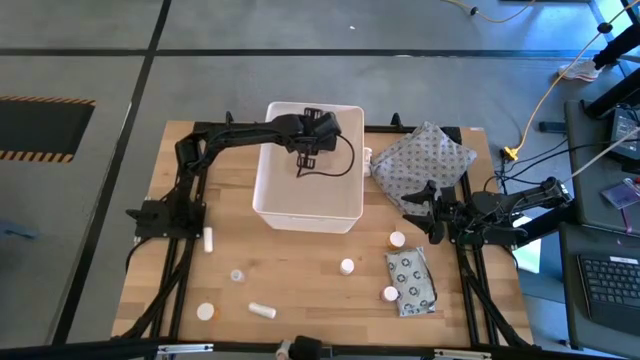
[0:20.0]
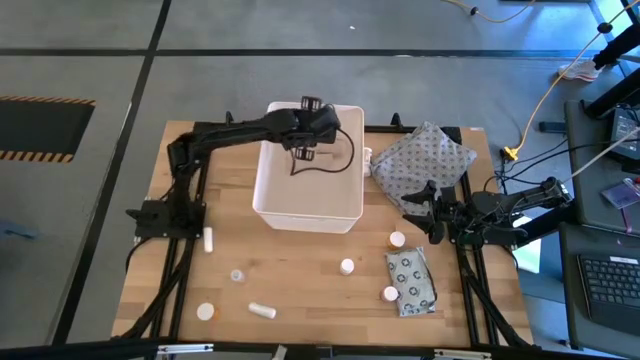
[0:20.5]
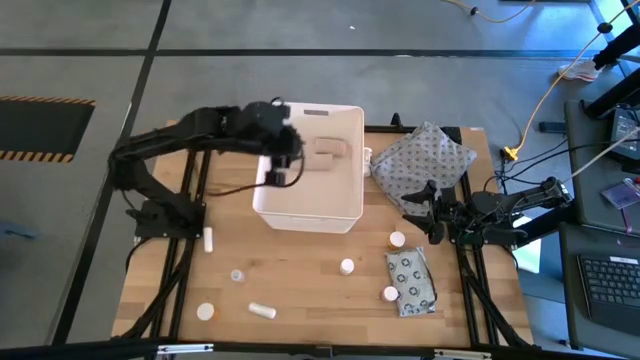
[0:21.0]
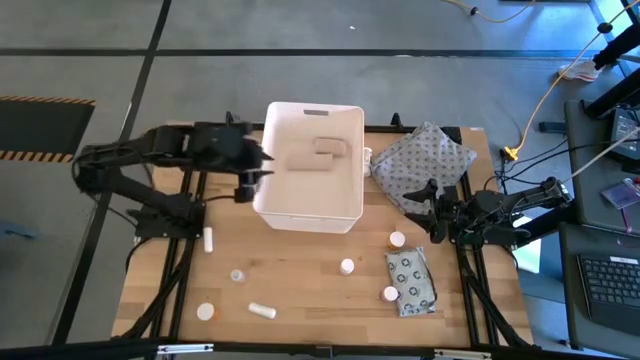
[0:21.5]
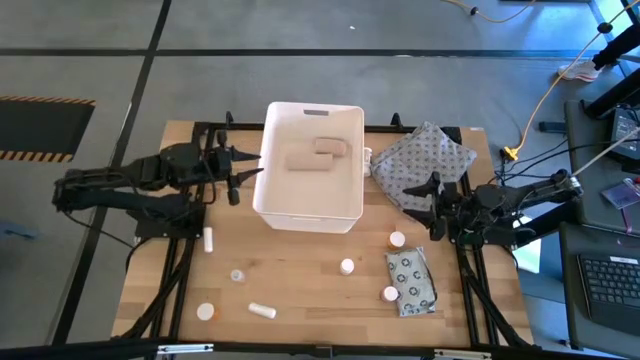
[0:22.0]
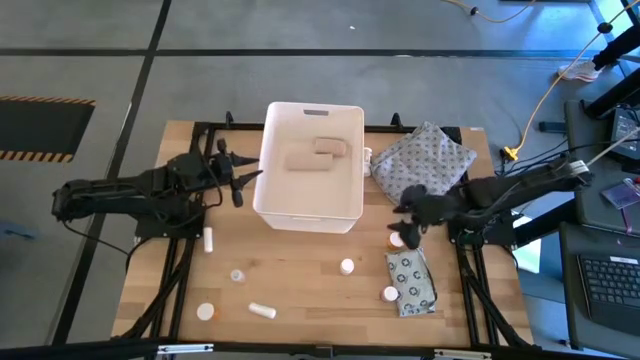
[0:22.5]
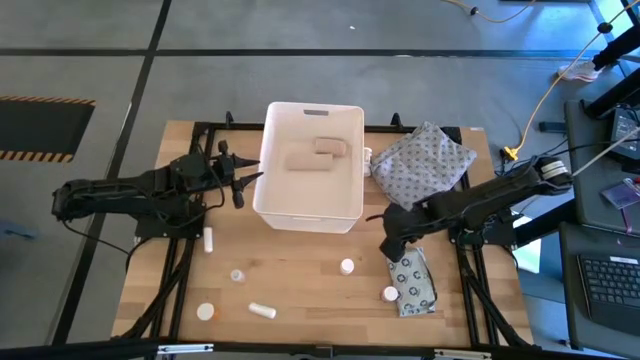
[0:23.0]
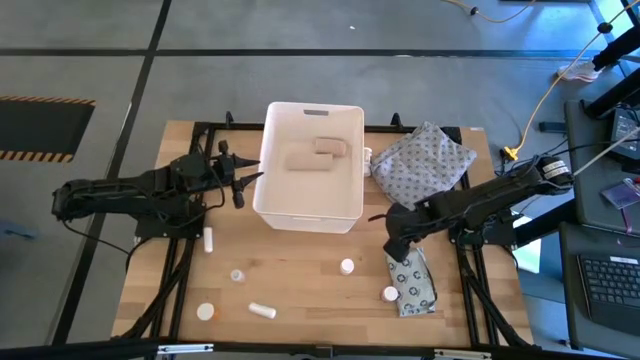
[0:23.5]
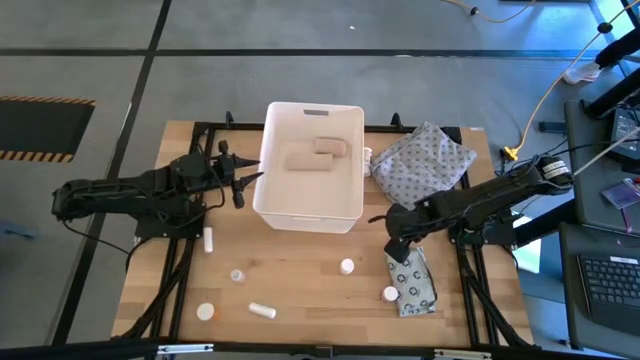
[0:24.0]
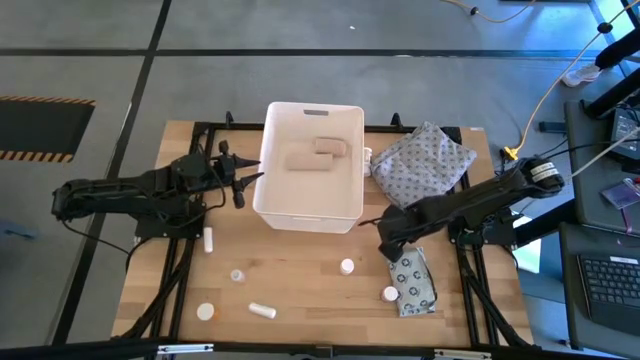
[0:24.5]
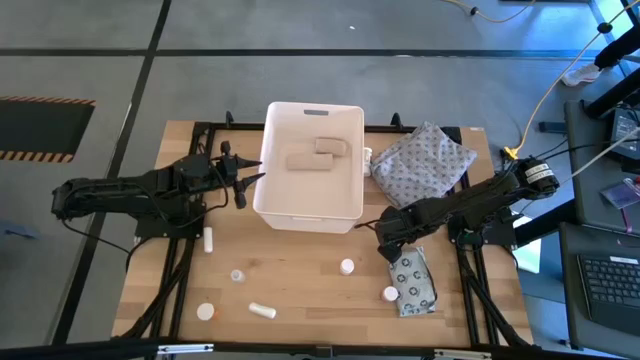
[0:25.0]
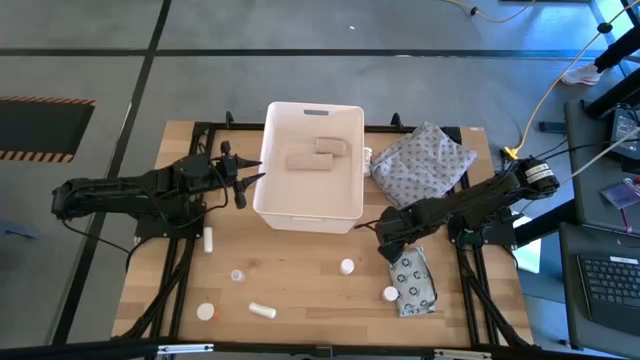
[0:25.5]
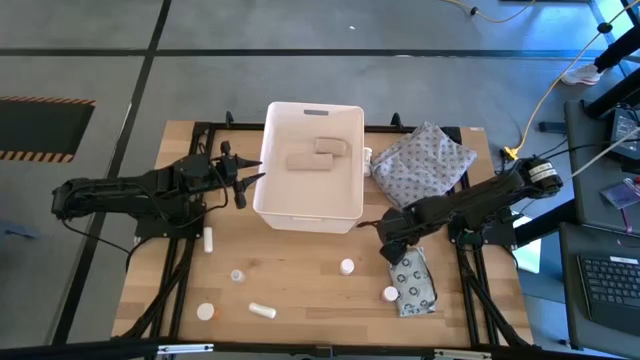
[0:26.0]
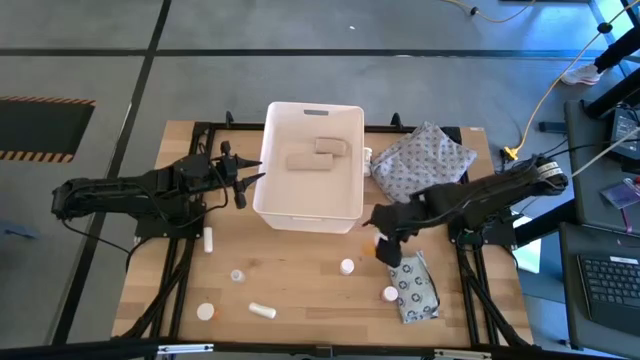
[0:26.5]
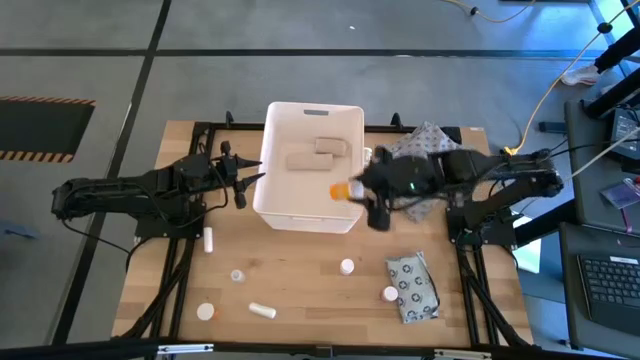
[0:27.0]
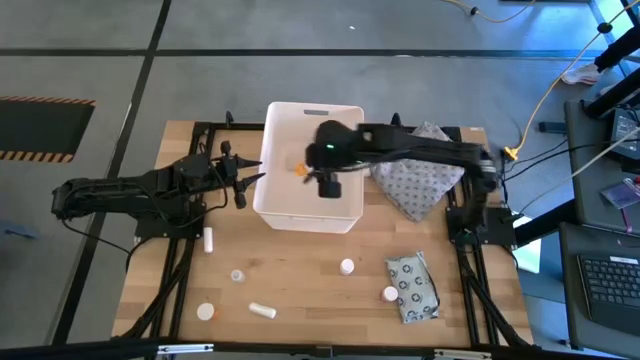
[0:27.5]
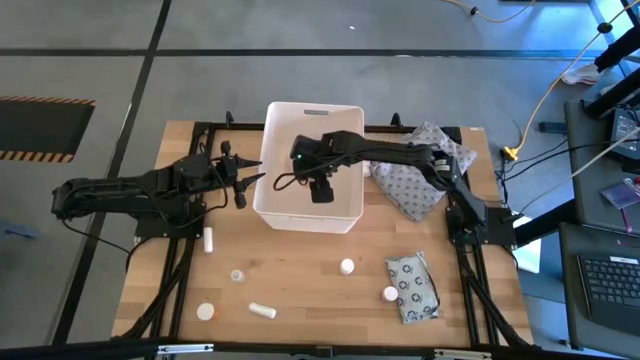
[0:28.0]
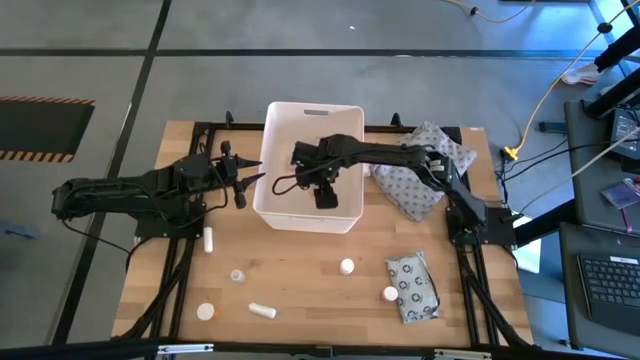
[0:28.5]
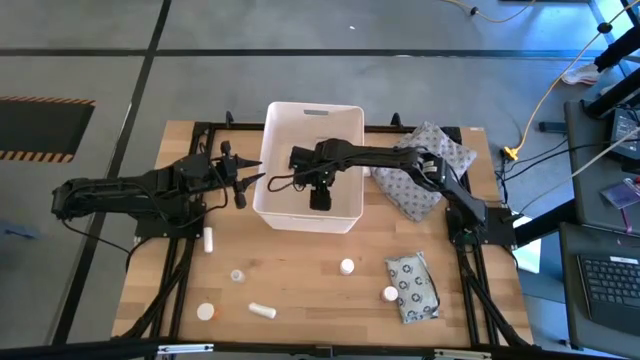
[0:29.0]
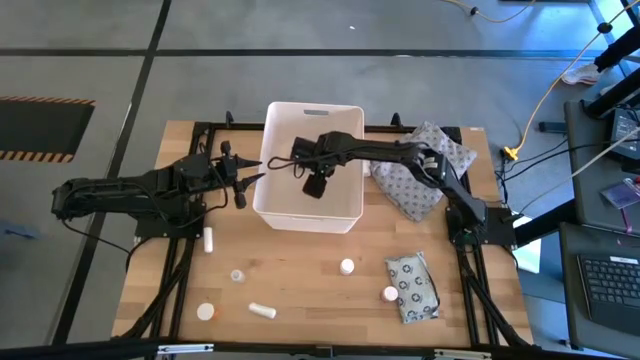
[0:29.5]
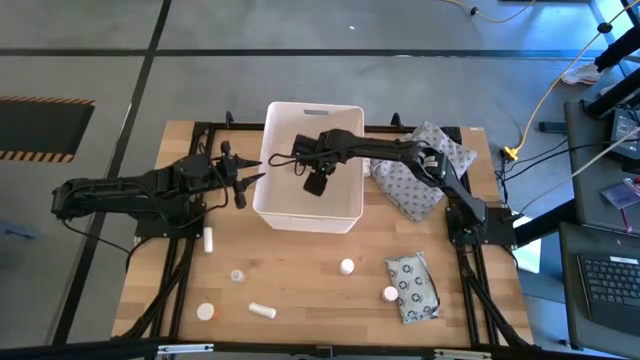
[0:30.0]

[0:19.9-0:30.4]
Task: Pick & place medical supplies in basket/bin
Put the top orange pill bottle into the white bin

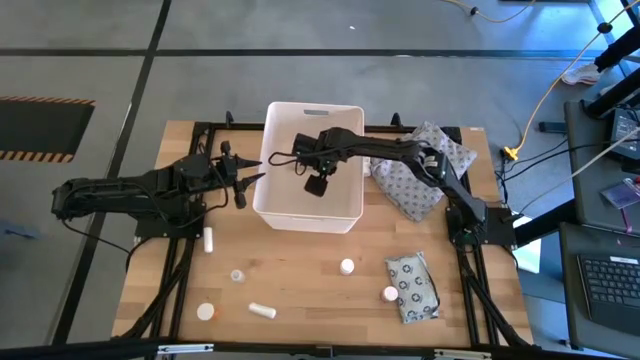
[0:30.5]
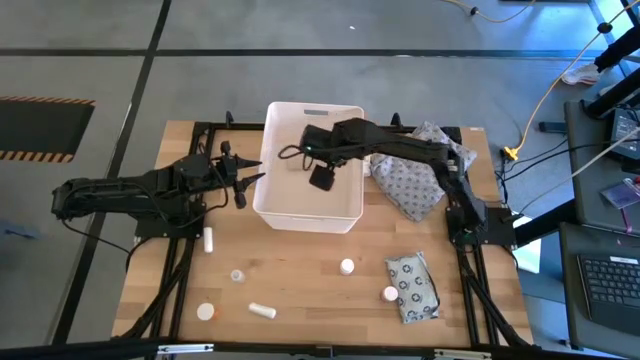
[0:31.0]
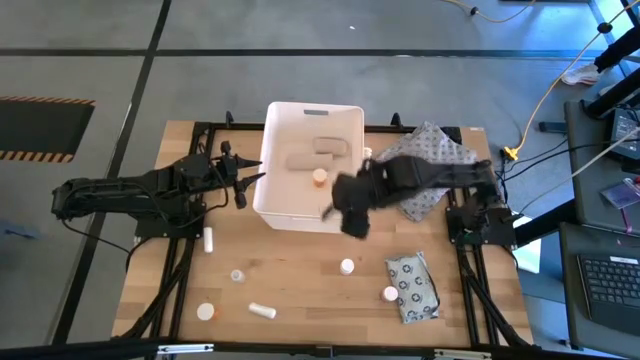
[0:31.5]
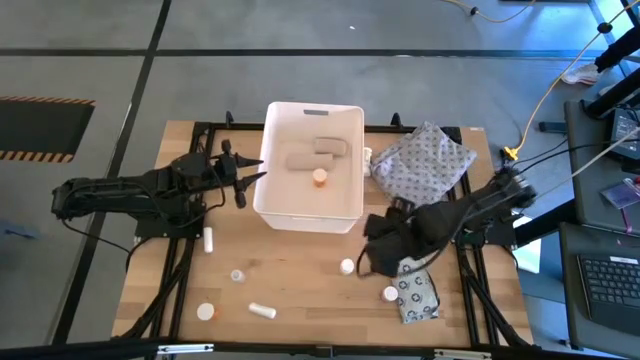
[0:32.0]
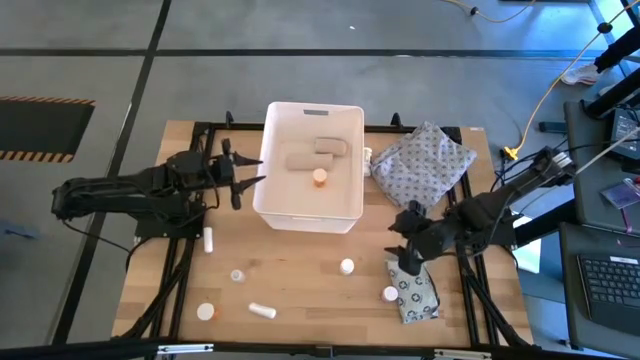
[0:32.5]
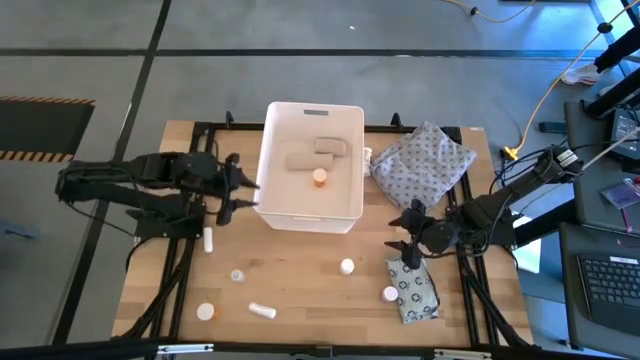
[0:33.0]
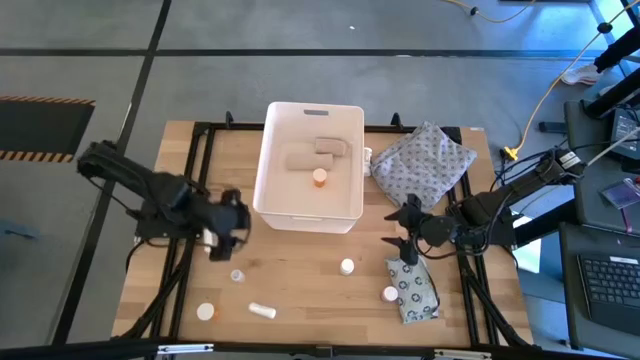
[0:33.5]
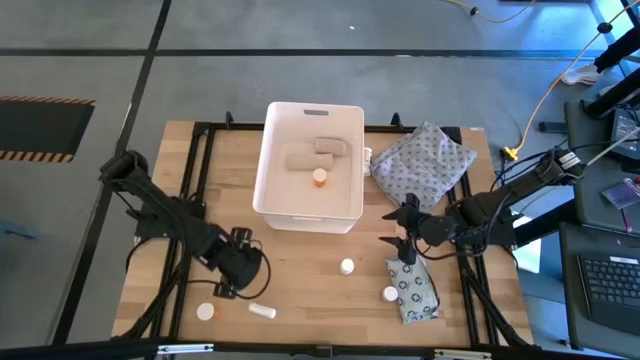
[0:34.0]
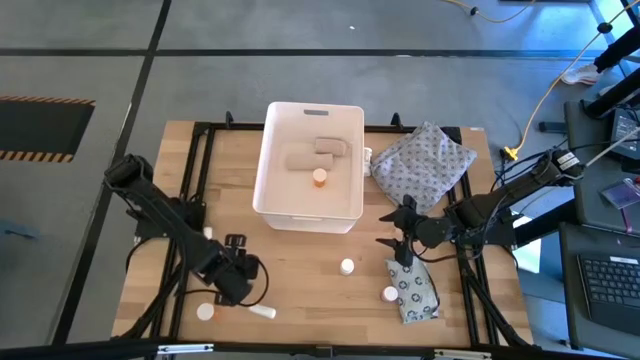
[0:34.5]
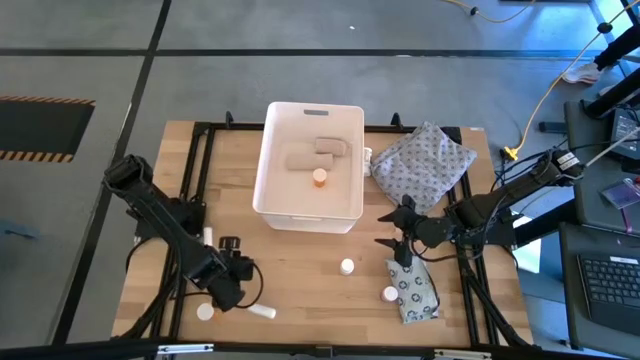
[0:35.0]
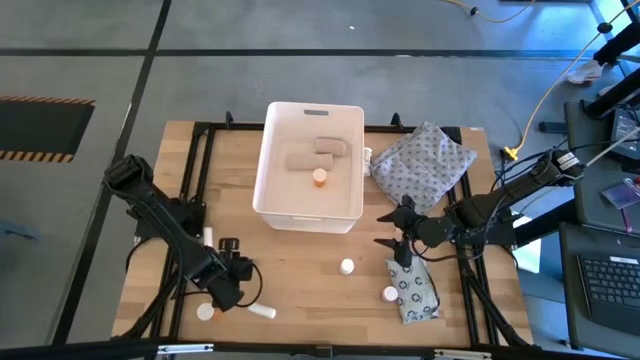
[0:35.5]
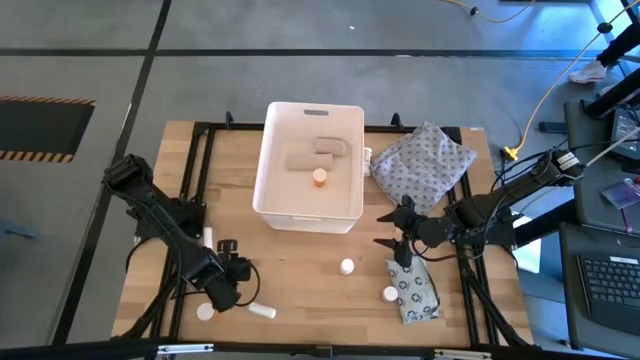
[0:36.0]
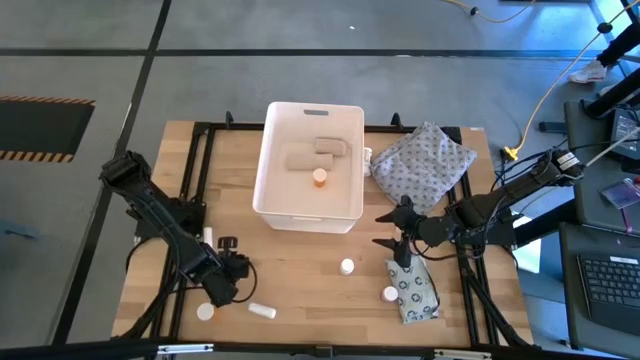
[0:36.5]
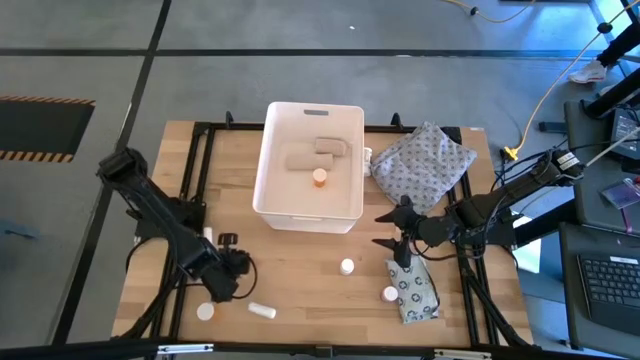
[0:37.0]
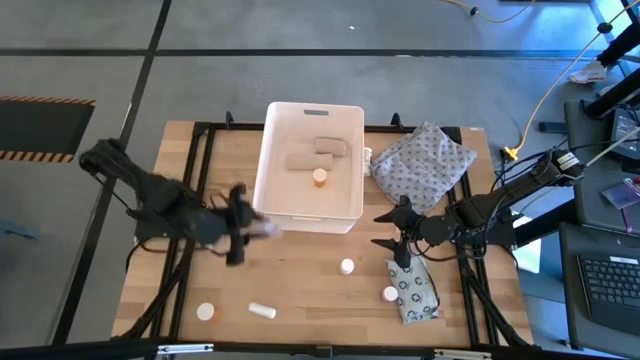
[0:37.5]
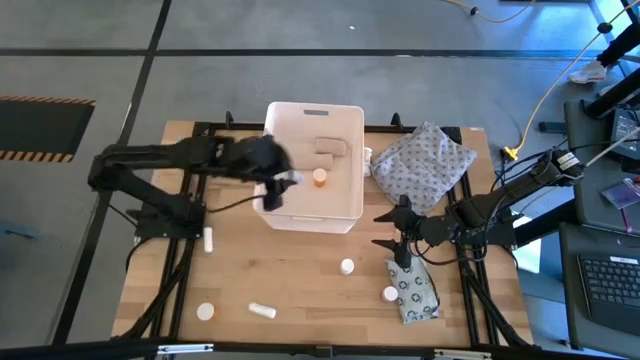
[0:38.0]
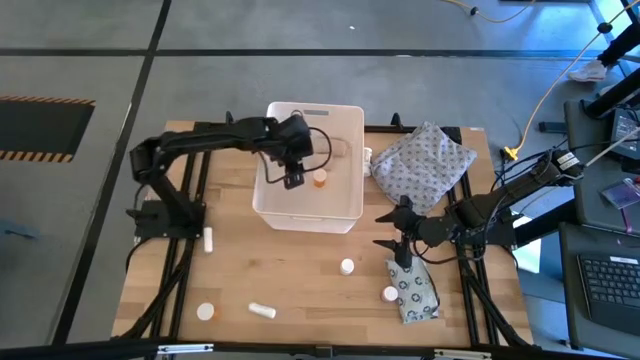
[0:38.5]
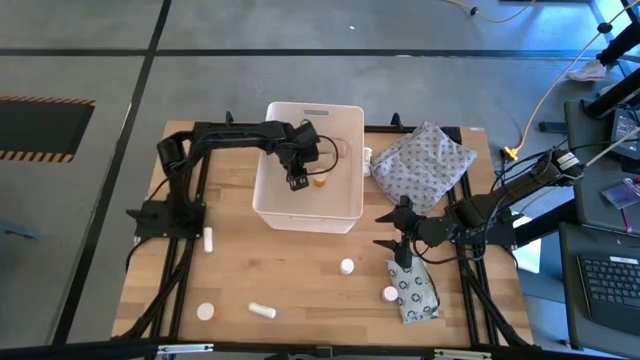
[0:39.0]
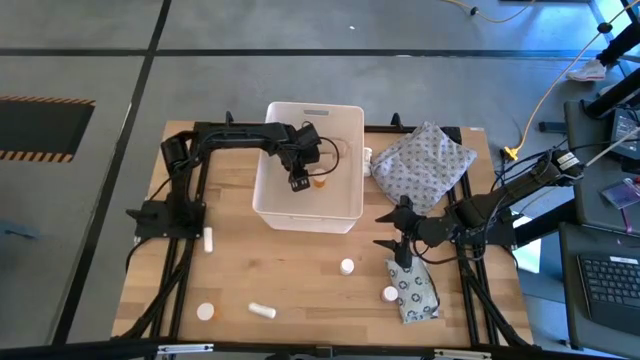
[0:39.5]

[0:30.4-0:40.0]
Put the transparent pill bottle into the white bin

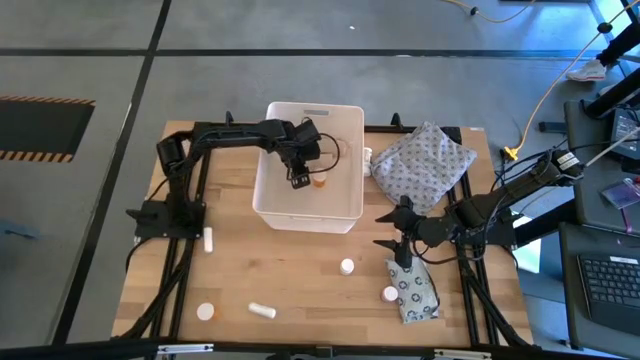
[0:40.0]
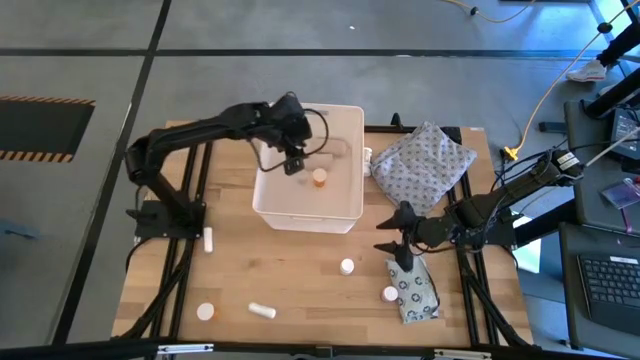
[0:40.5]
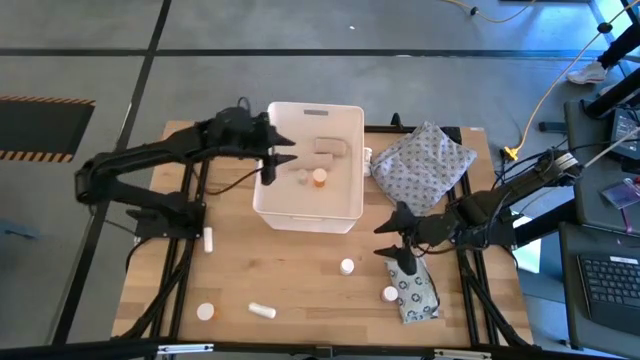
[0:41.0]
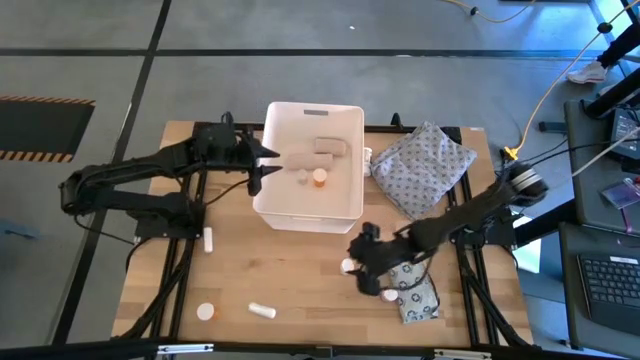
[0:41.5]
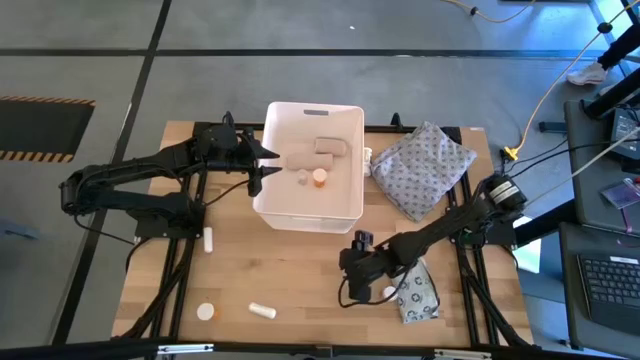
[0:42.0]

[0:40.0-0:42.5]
Put the bottom white pill bottle into the white bin
